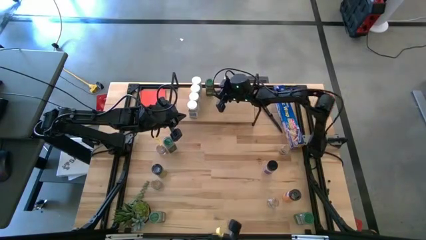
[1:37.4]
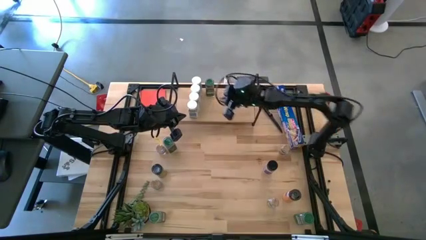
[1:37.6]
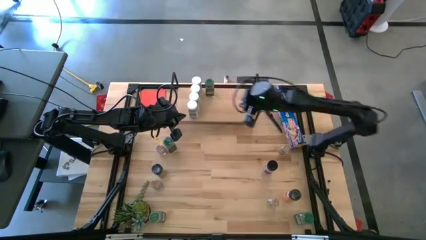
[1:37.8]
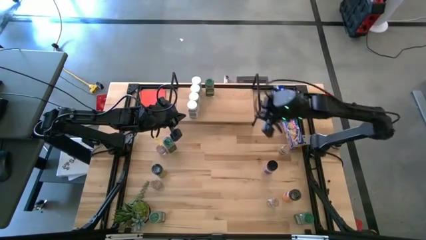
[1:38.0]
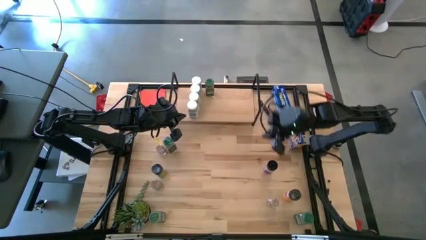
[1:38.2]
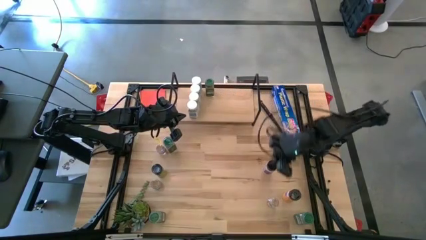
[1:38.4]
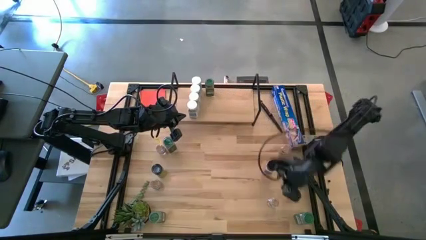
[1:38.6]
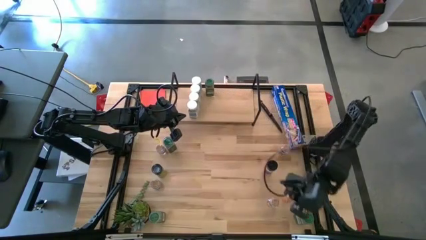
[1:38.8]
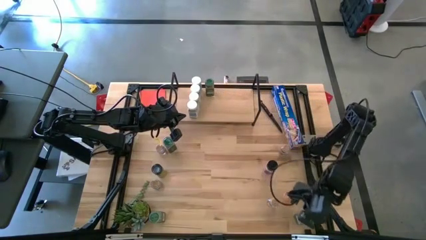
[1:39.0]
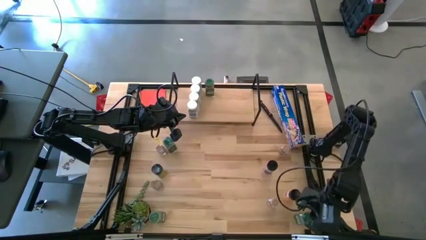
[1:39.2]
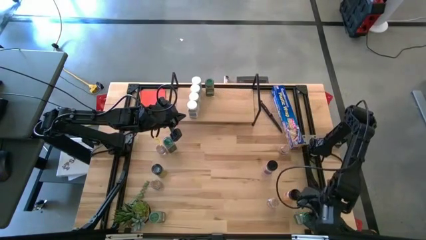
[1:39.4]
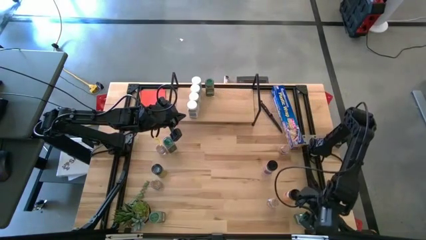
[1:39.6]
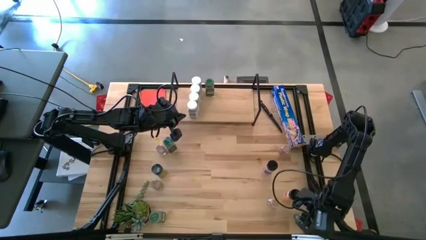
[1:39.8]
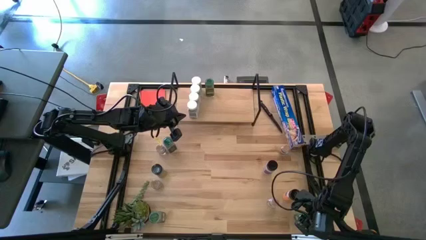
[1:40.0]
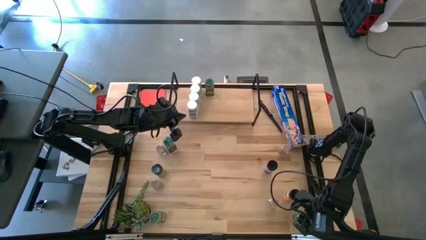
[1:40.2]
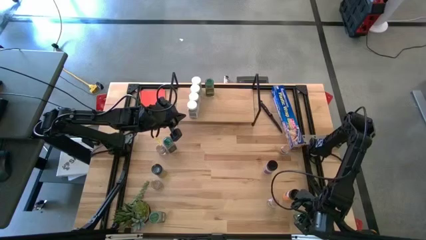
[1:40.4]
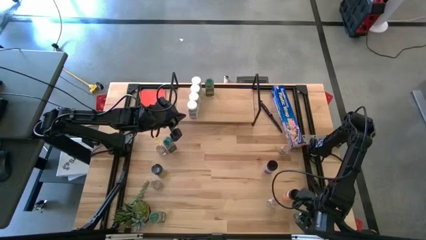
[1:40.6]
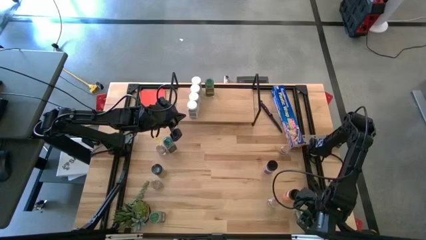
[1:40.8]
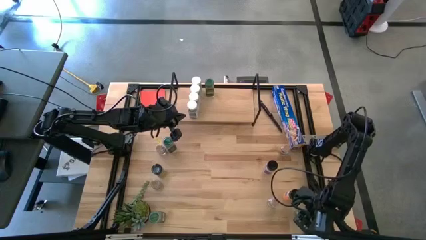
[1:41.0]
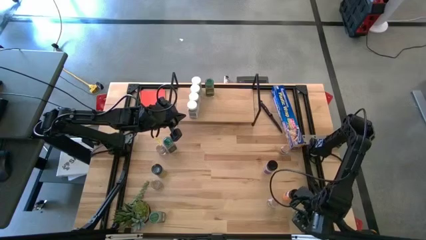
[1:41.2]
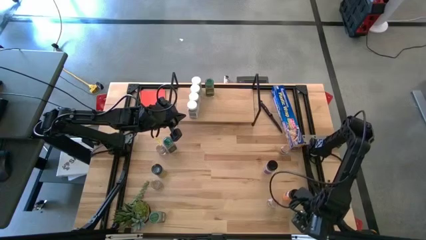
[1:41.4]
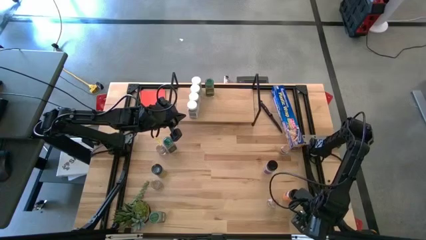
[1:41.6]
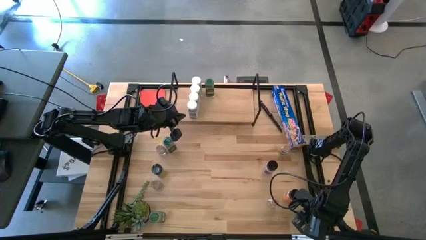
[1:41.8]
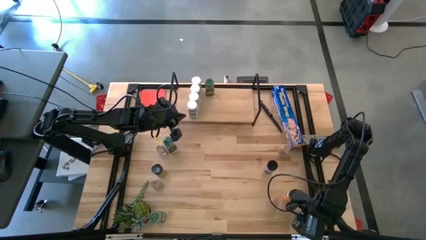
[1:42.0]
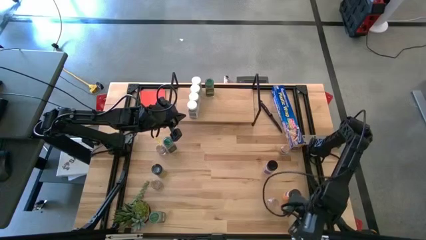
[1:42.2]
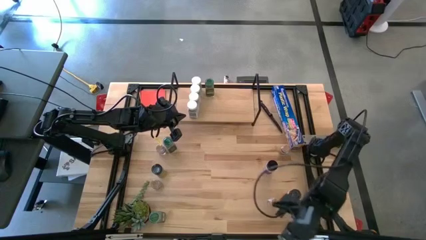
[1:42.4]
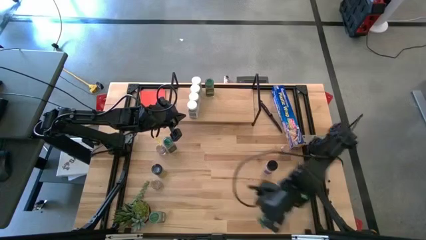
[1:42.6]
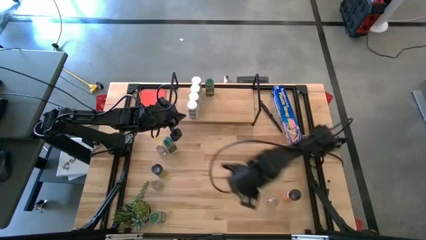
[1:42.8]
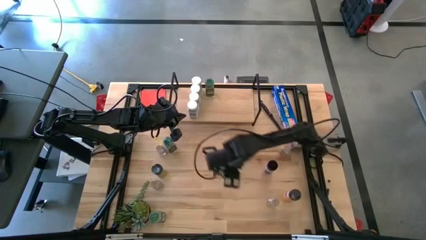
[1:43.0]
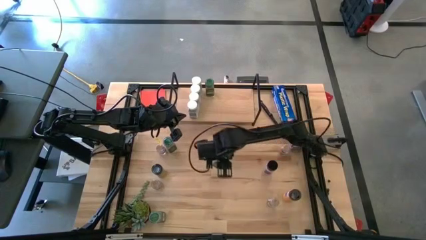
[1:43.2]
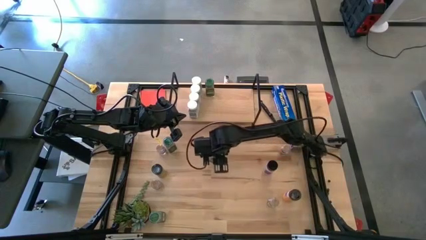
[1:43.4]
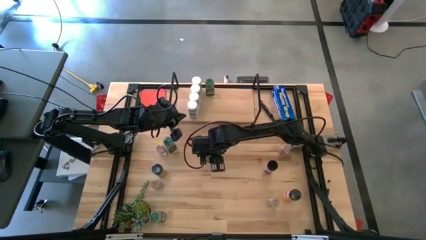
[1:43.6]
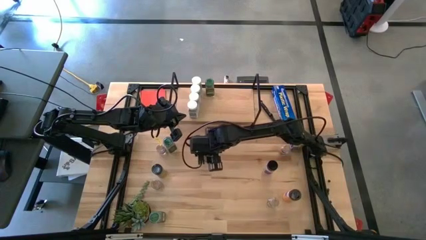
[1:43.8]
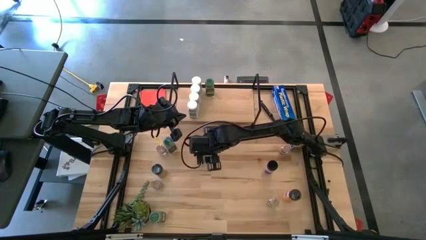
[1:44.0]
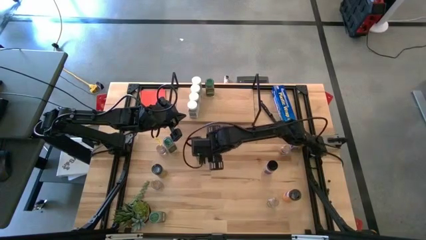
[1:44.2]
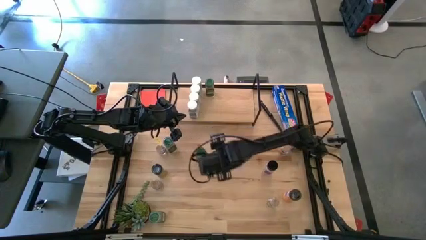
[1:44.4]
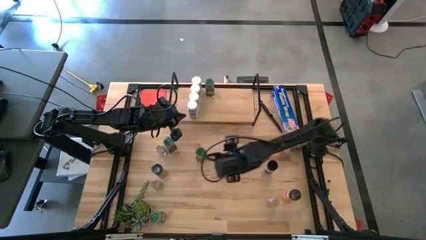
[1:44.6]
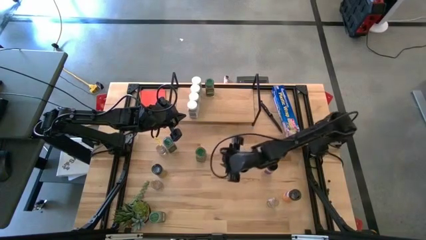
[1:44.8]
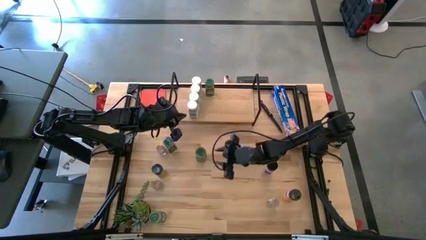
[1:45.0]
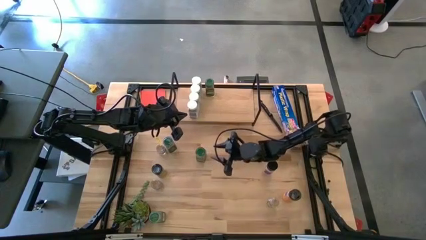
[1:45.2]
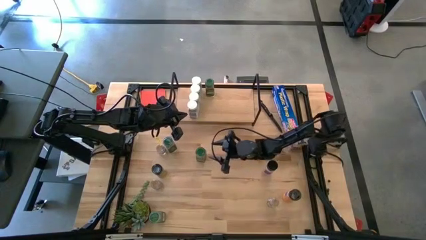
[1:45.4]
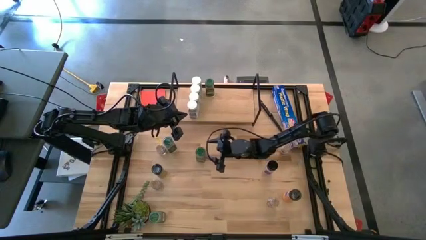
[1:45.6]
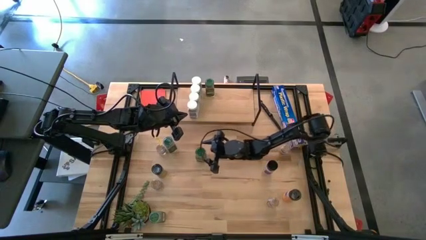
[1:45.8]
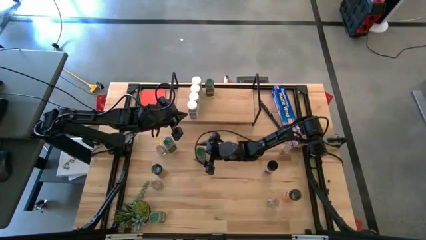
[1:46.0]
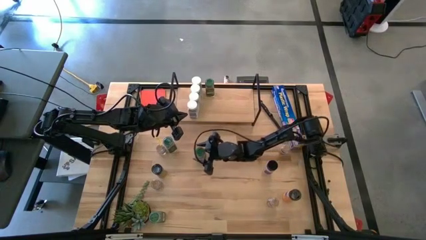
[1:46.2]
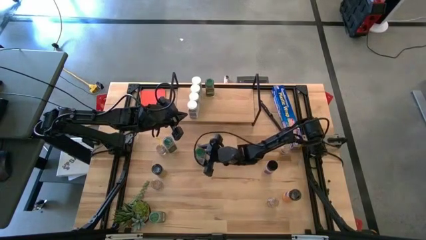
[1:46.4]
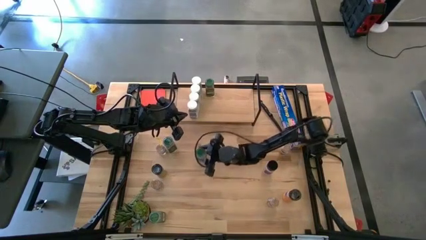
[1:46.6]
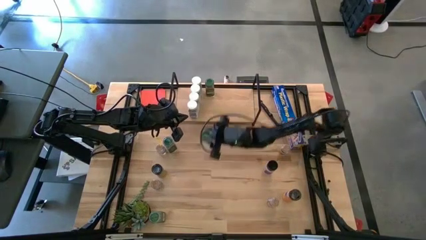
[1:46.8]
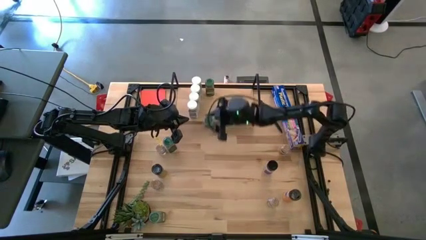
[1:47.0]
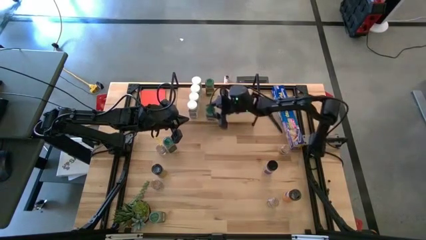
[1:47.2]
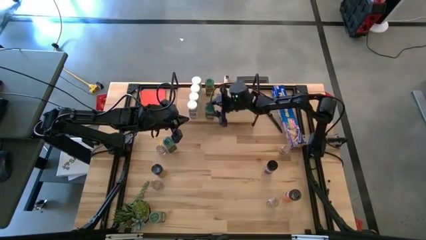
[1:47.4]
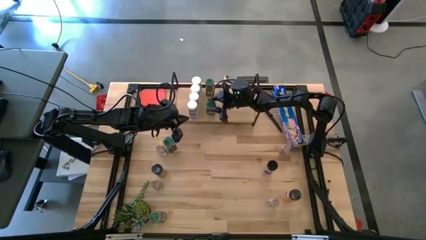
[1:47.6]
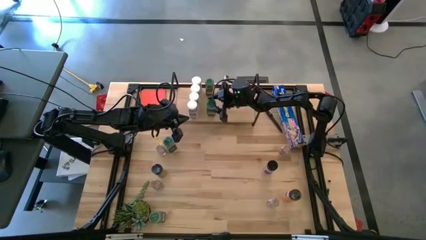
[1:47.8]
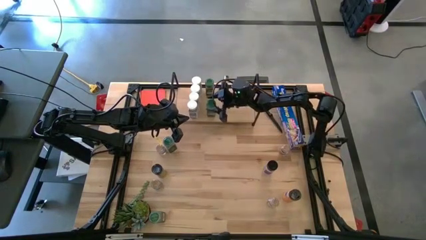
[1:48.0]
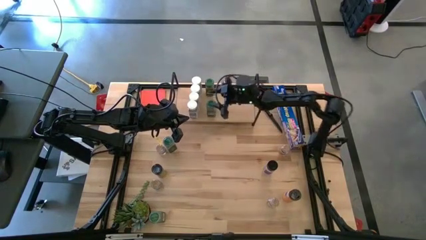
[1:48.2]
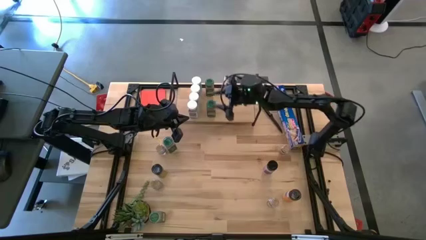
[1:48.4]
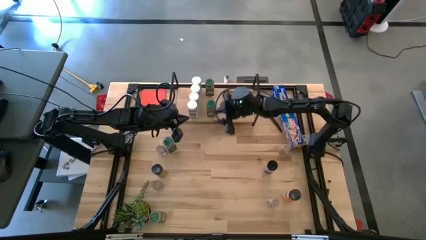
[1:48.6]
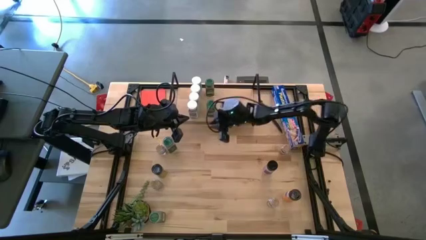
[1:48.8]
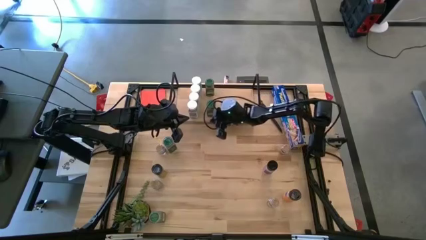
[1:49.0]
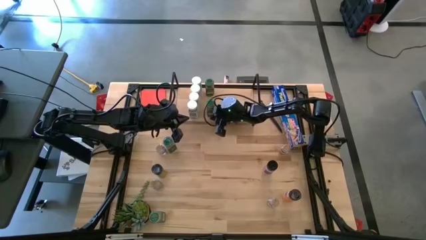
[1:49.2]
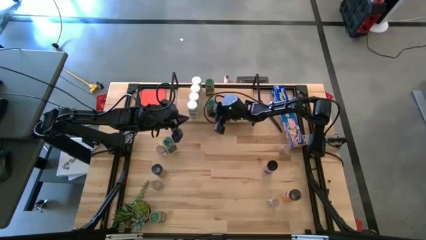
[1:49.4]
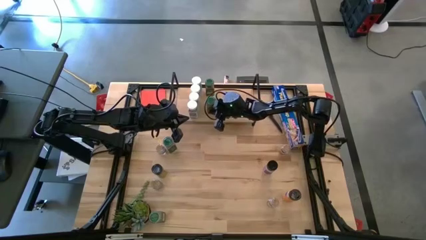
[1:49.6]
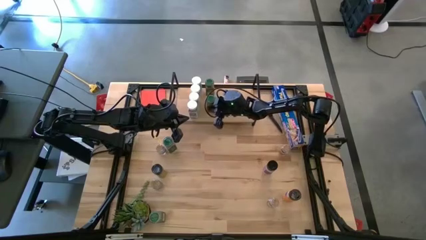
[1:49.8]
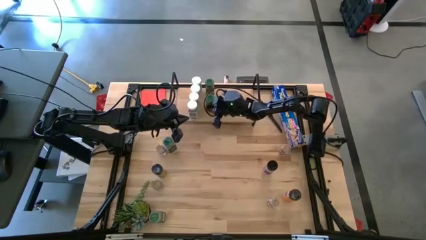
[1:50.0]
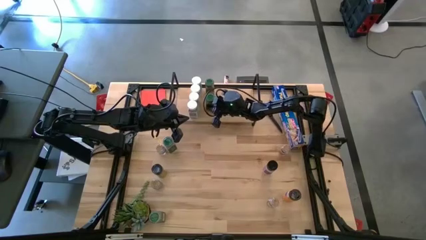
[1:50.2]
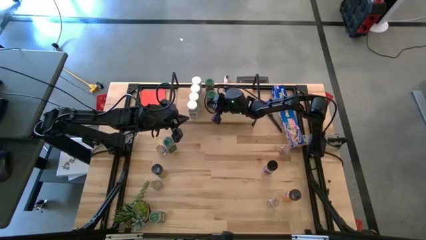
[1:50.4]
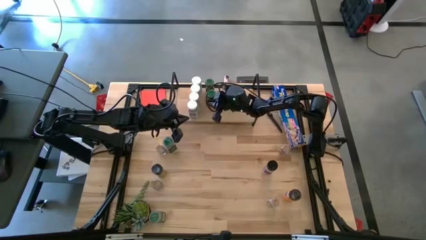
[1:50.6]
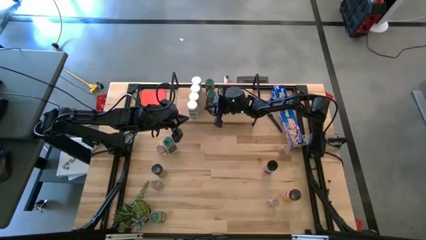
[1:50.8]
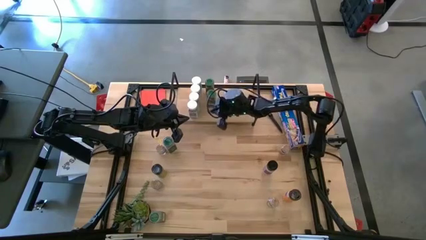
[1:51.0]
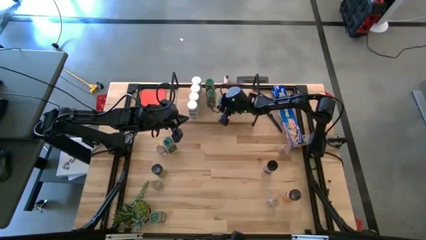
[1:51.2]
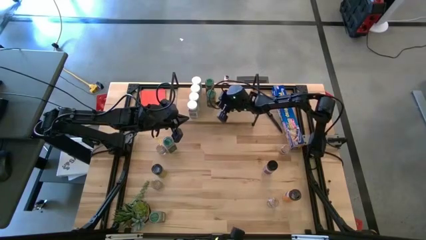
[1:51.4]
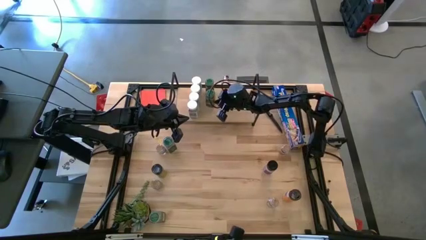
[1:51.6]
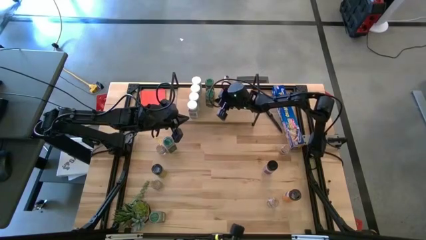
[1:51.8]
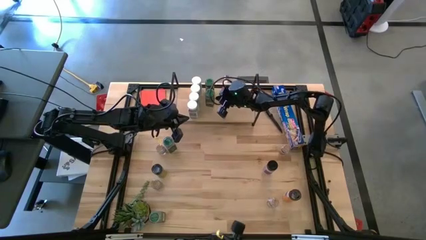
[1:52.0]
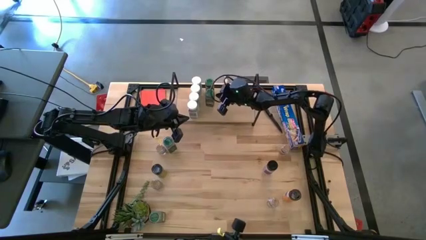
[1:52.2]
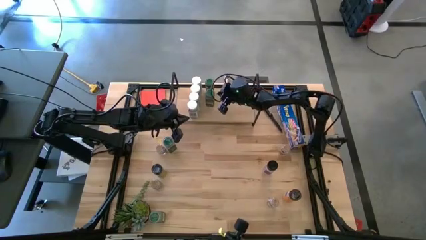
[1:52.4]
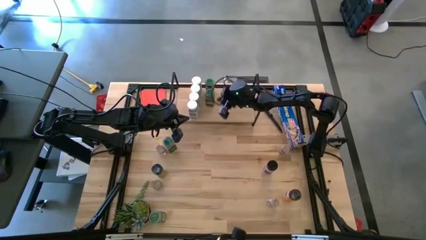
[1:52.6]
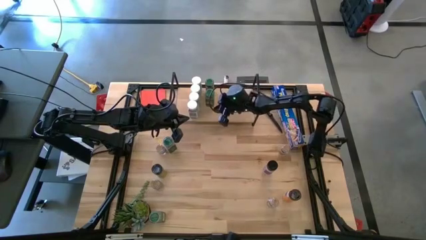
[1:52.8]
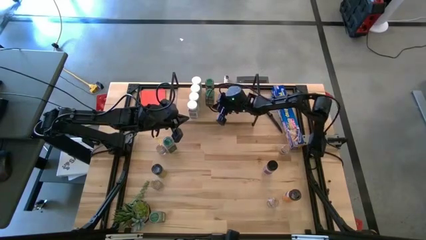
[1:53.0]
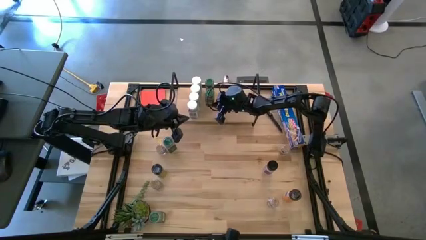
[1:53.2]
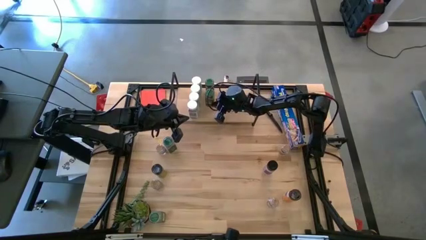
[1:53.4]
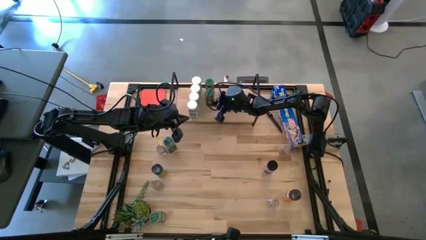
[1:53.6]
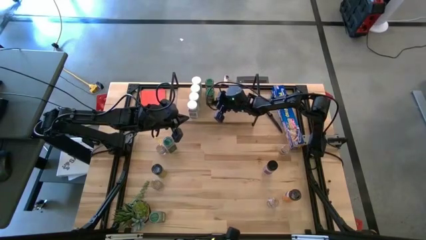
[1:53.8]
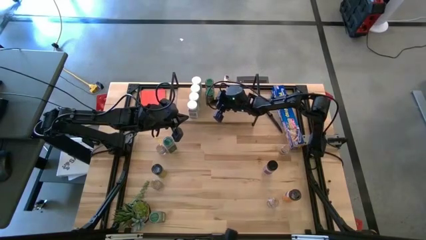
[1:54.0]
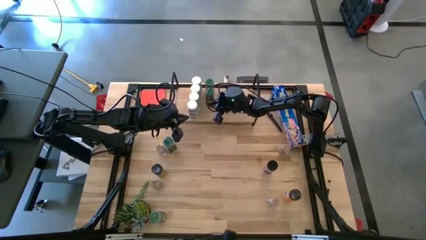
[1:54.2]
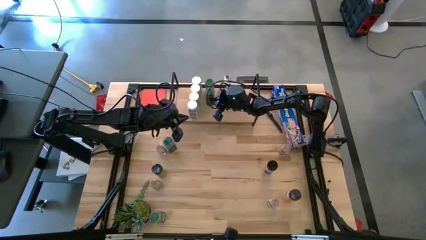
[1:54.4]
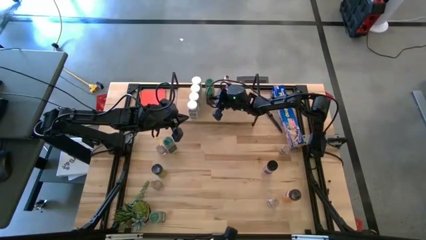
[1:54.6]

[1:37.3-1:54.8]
Task: Shelf spices
Put the bottom right green seasoning bottle on the shelf aligned with the other green seasoning bottle
